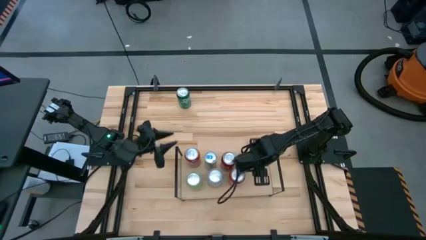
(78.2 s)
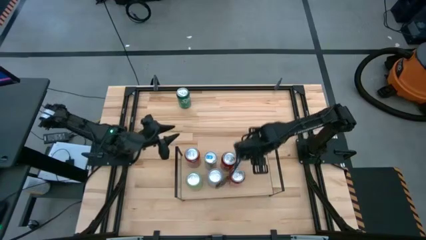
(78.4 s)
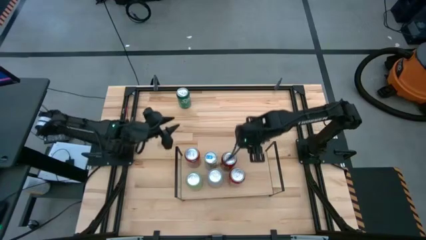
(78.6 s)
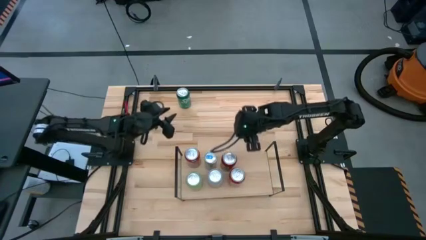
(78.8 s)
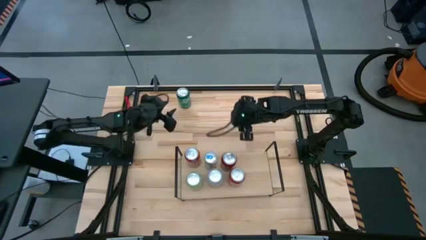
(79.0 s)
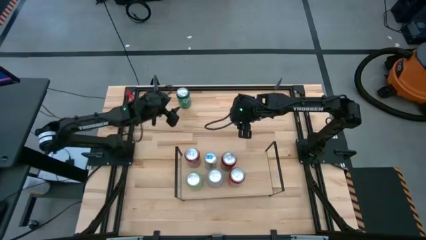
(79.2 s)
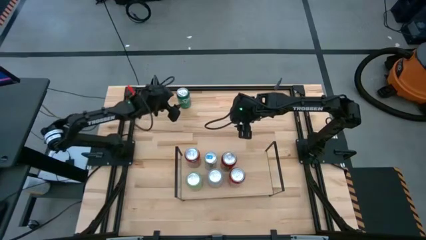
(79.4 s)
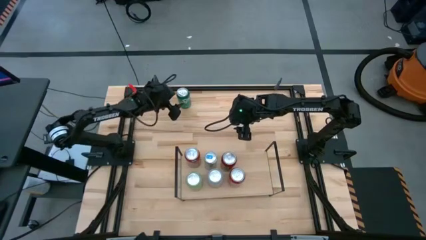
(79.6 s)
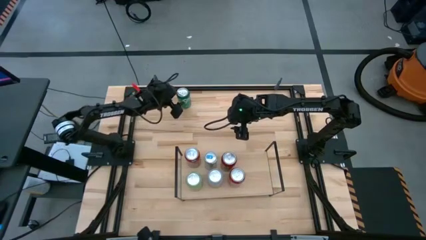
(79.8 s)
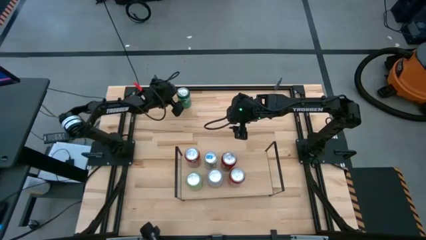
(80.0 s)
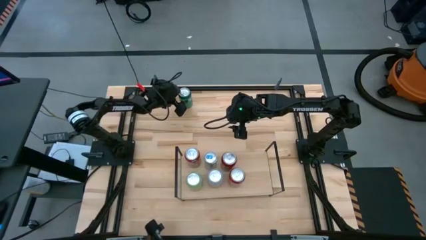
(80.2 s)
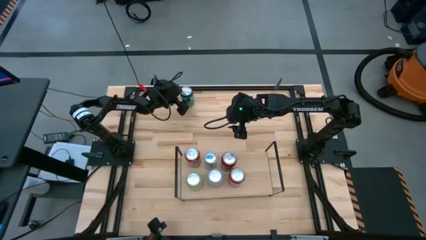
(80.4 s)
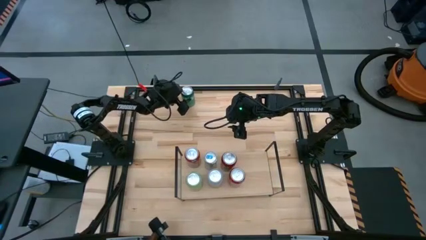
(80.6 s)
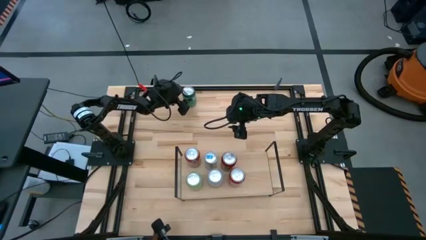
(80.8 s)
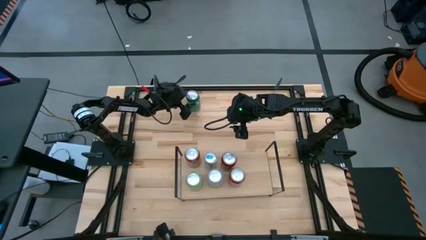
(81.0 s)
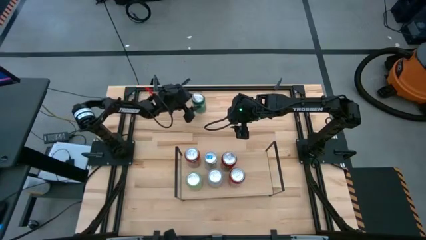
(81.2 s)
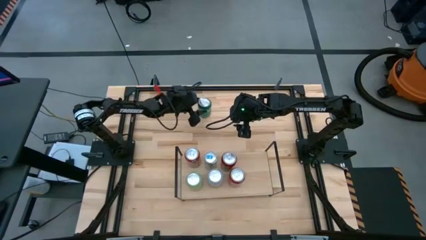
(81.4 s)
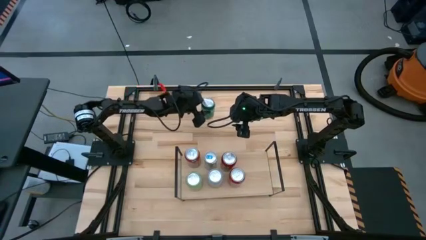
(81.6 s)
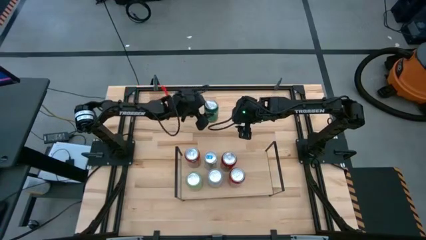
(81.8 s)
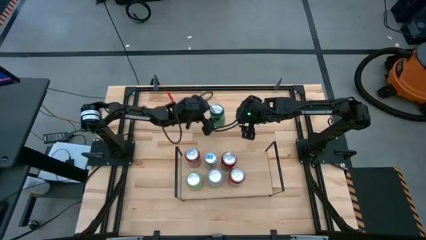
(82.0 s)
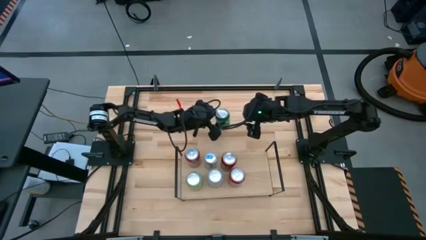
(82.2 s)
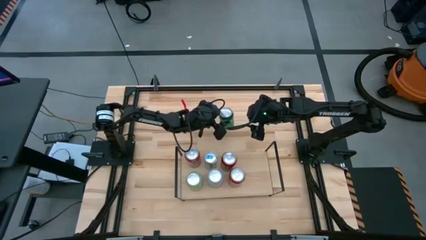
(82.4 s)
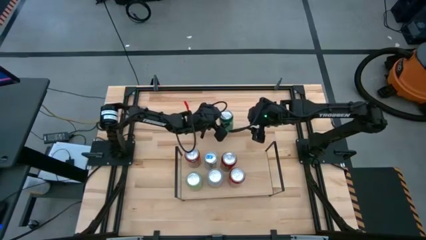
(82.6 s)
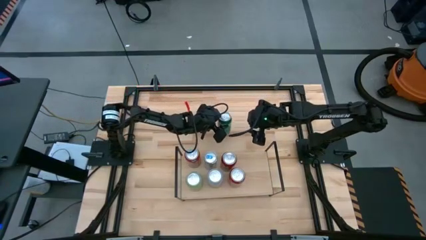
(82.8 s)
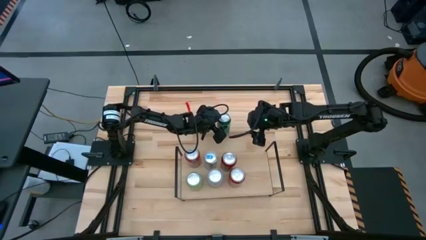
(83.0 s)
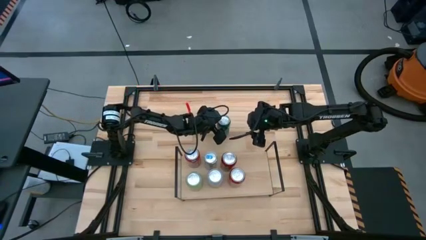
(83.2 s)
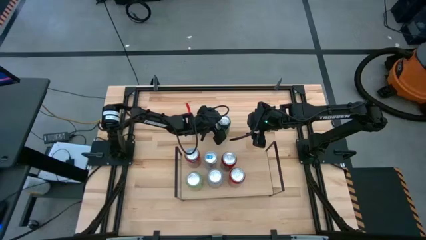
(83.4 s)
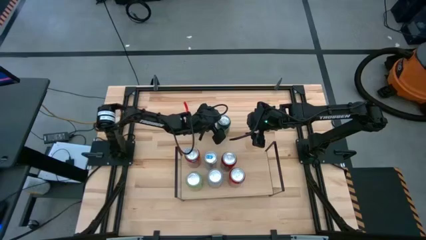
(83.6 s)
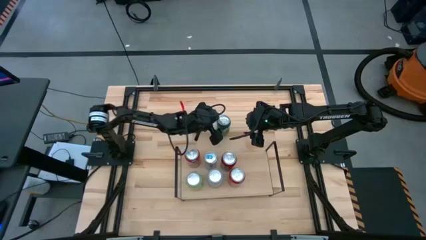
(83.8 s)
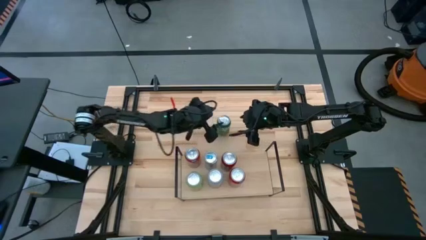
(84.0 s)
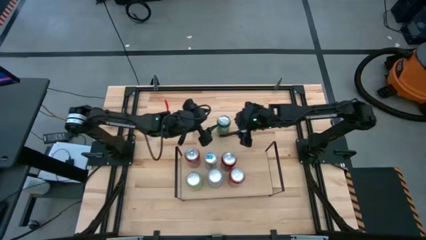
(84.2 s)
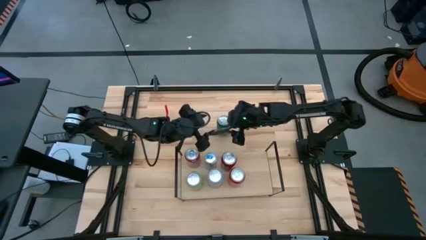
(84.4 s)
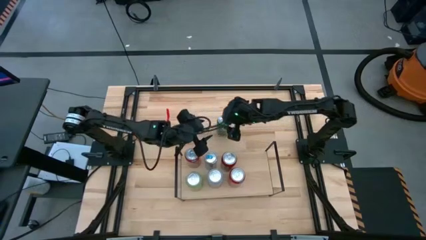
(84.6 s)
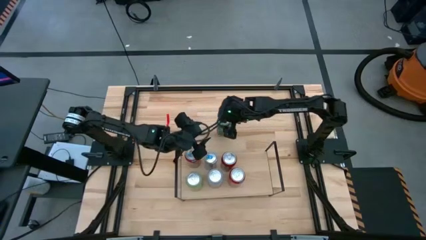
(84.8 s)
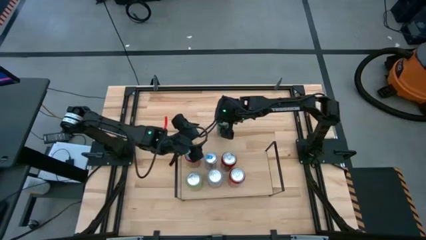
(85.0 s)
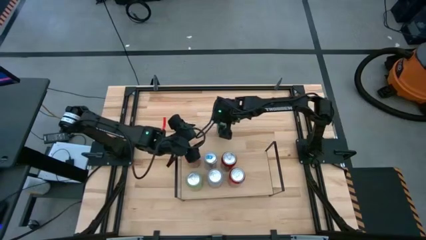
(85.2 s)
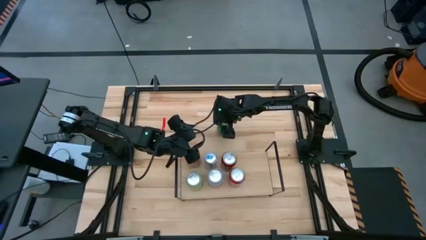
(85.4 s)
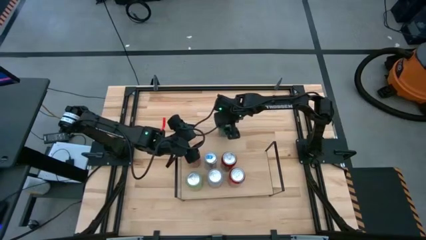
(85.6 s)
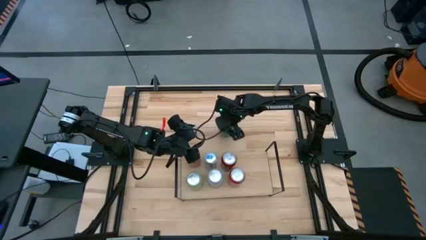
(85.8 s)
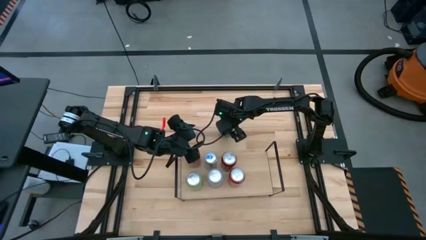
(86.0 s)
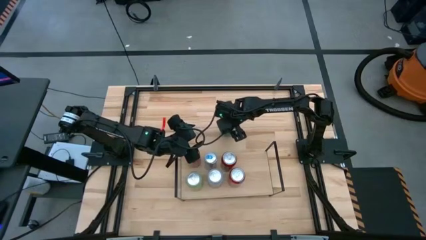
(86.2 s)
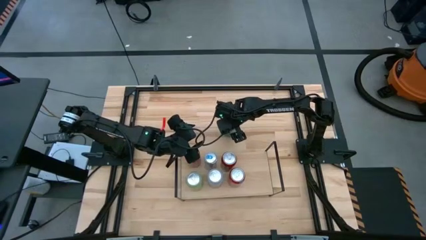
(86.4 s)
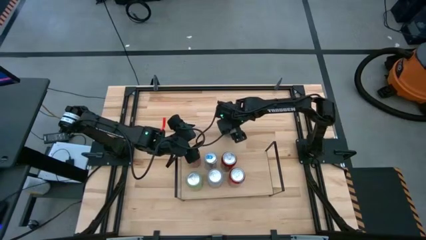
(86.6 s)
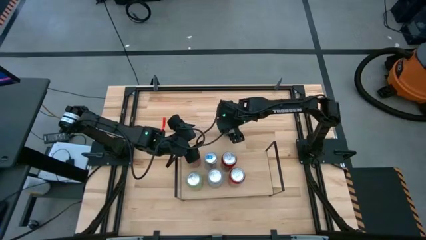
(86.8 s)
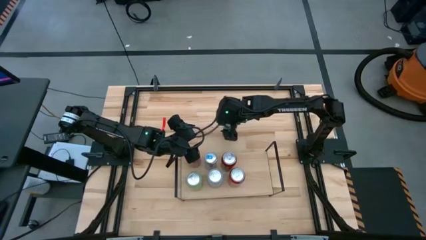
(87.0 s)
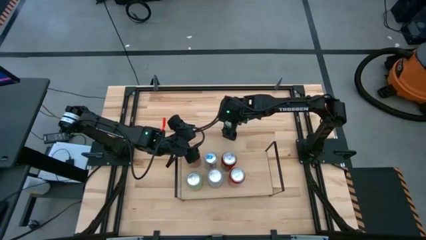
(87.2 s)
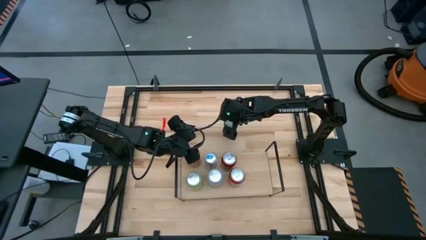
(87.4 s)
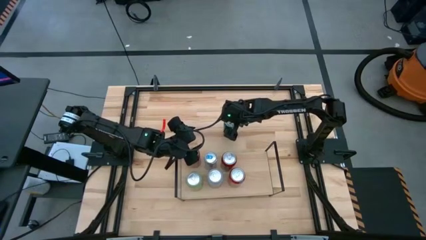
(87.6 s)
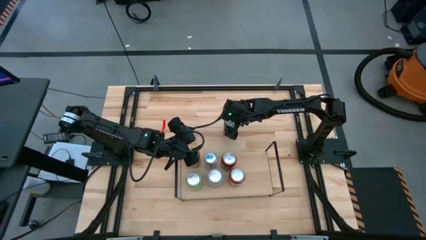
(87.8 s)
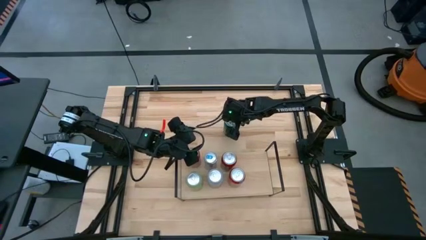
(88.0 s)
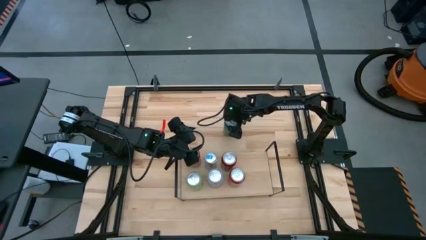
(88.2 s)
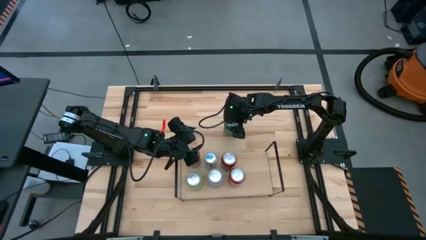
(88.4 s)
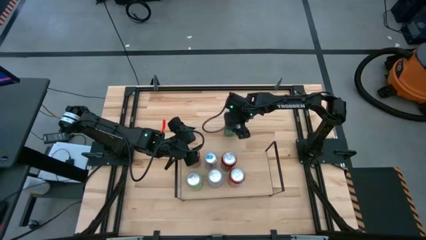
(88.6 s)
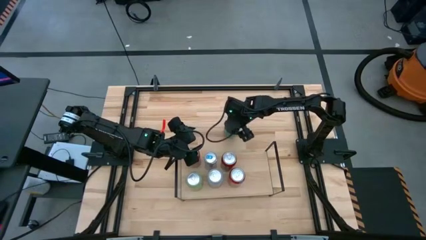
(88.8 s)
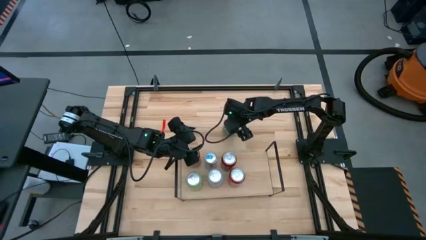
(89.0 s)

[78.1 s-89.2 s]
Task: Place canned beverage on shelf
Put the green soda can on the shelf
